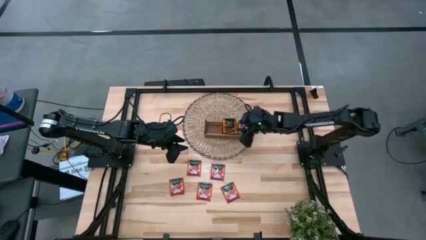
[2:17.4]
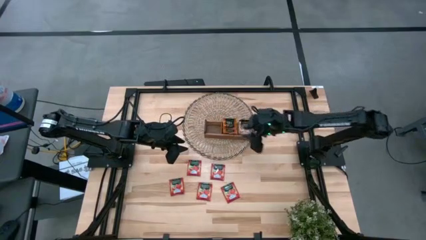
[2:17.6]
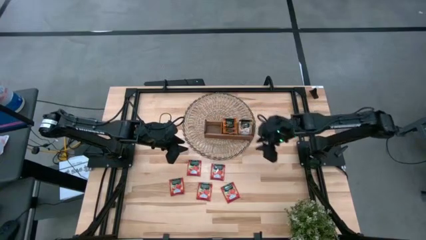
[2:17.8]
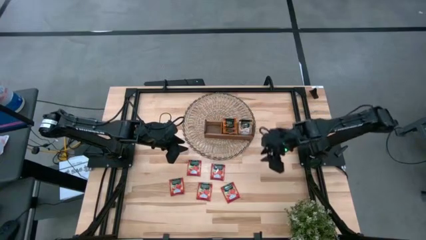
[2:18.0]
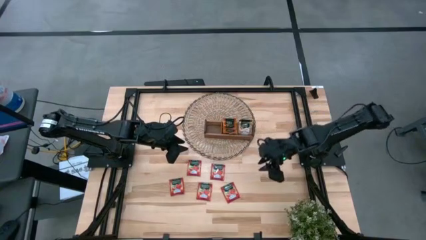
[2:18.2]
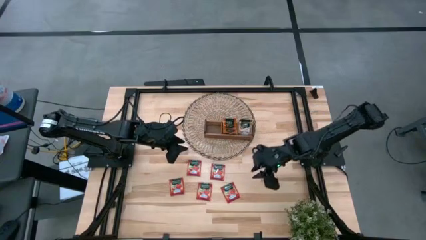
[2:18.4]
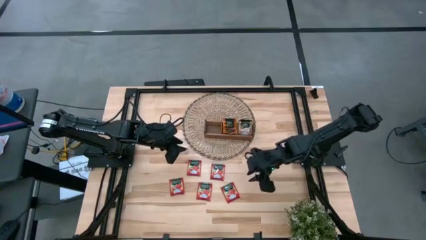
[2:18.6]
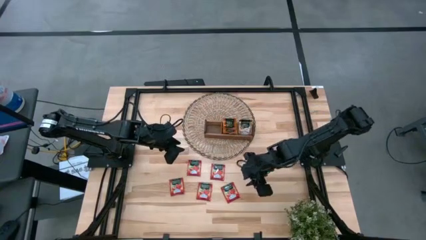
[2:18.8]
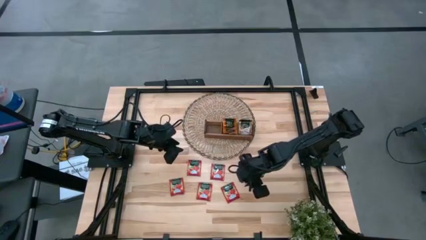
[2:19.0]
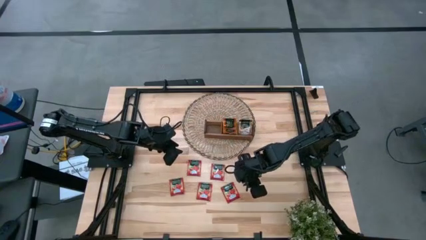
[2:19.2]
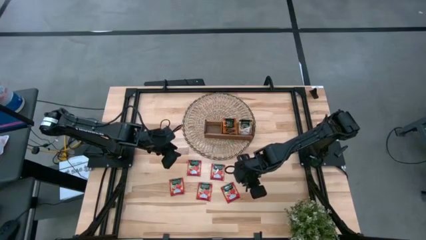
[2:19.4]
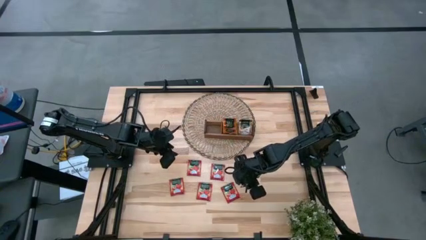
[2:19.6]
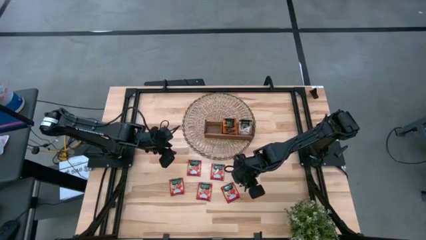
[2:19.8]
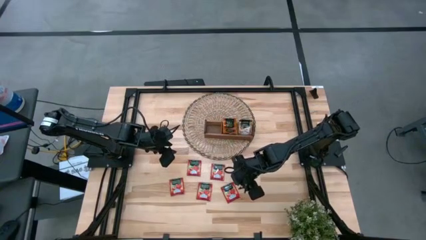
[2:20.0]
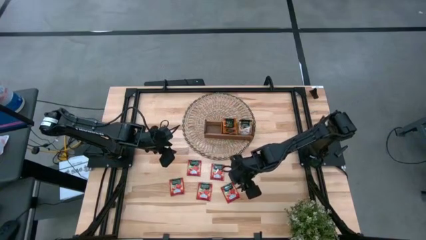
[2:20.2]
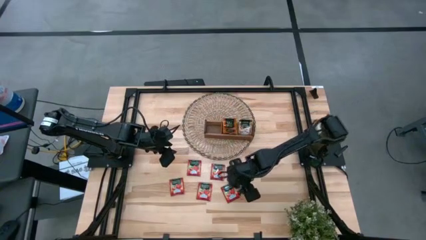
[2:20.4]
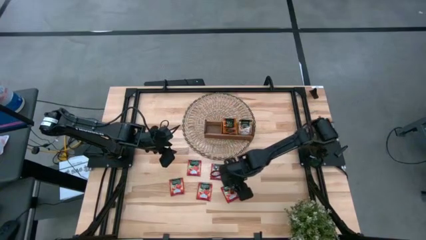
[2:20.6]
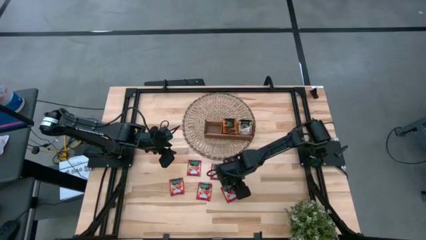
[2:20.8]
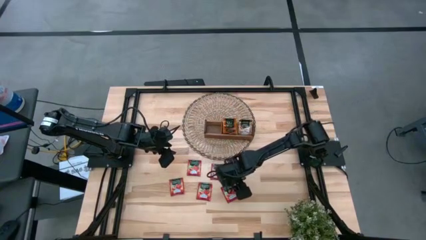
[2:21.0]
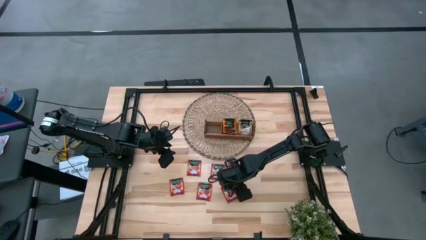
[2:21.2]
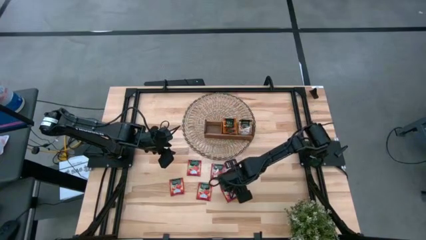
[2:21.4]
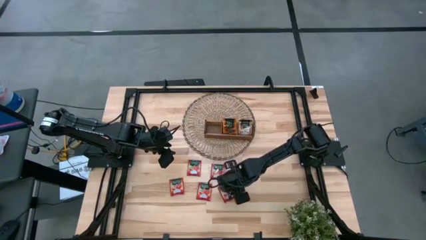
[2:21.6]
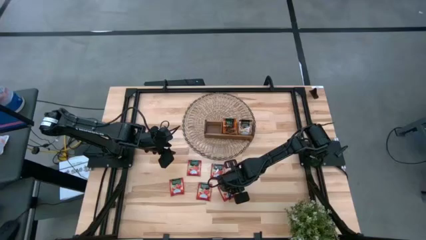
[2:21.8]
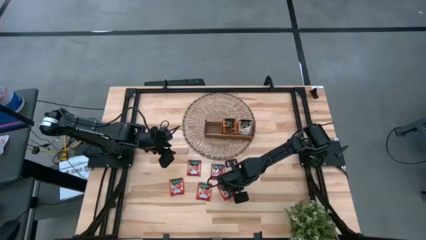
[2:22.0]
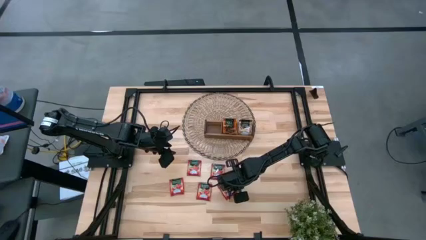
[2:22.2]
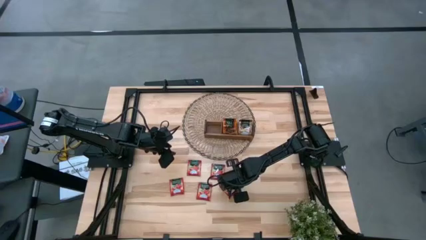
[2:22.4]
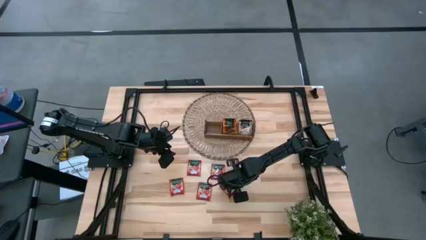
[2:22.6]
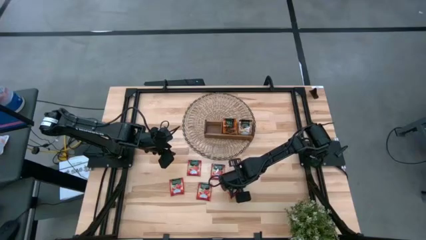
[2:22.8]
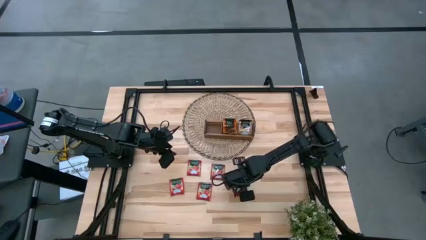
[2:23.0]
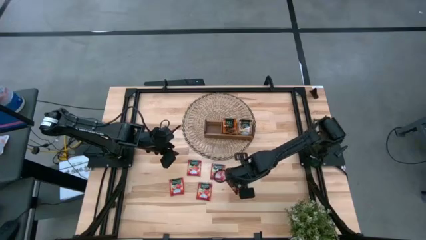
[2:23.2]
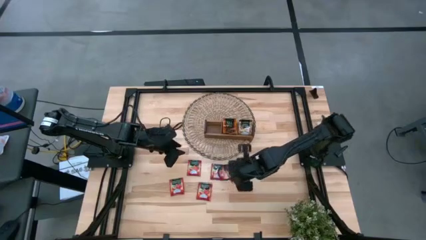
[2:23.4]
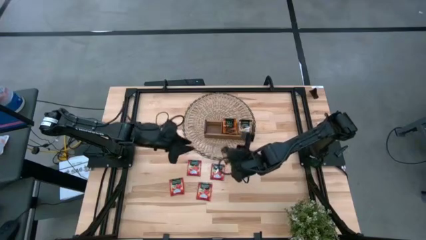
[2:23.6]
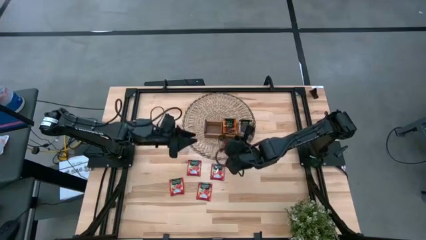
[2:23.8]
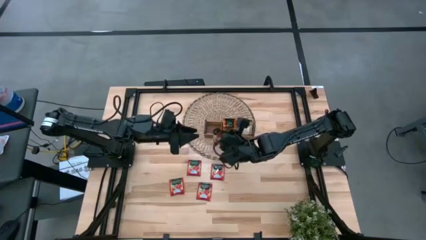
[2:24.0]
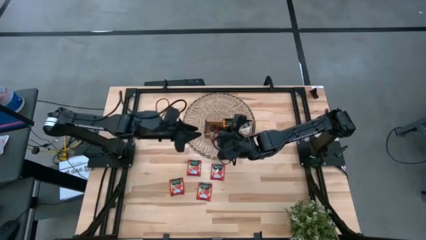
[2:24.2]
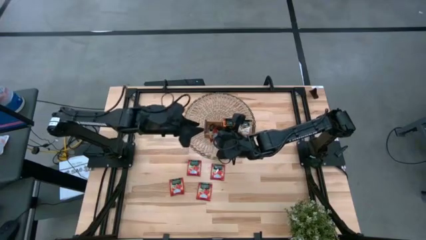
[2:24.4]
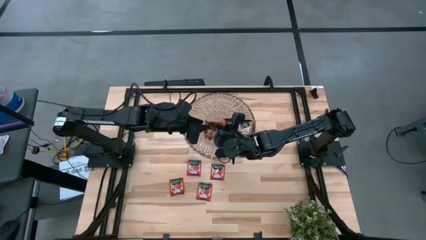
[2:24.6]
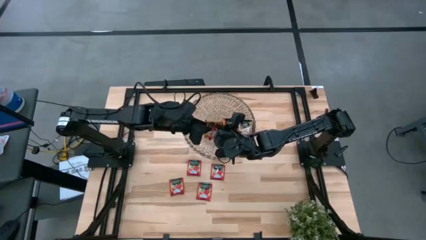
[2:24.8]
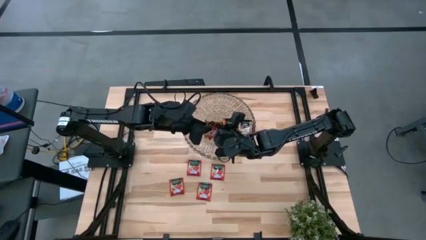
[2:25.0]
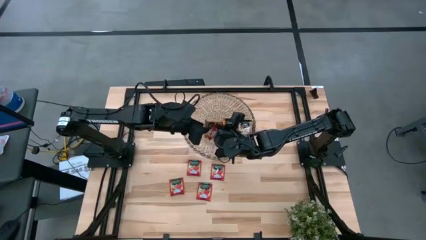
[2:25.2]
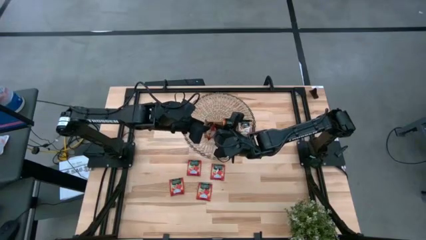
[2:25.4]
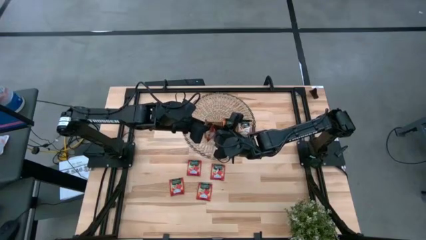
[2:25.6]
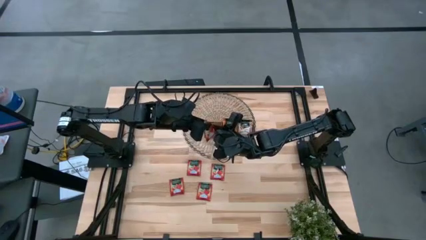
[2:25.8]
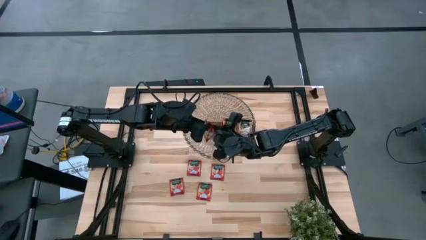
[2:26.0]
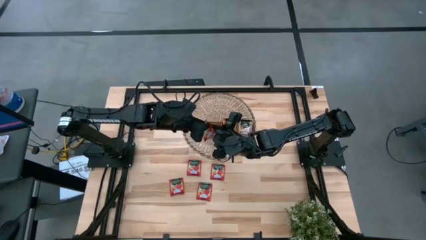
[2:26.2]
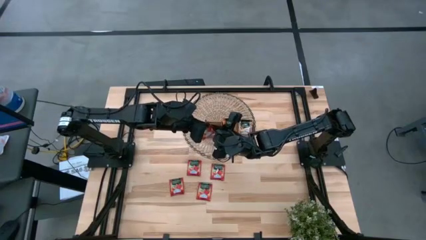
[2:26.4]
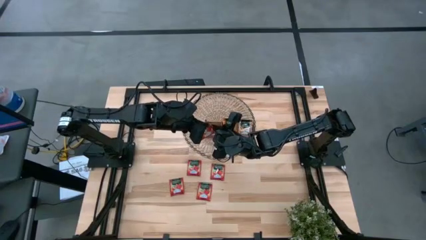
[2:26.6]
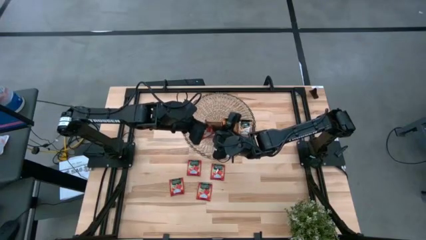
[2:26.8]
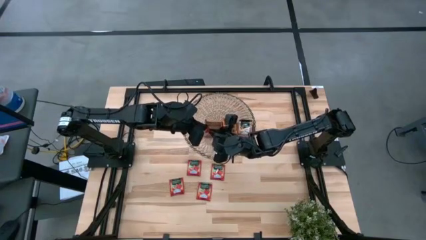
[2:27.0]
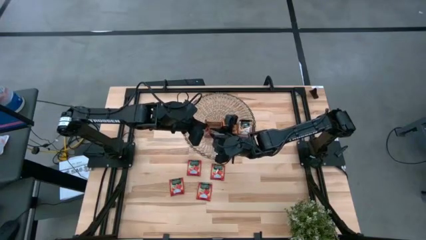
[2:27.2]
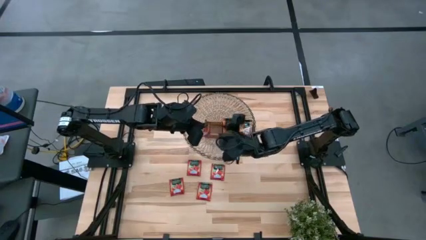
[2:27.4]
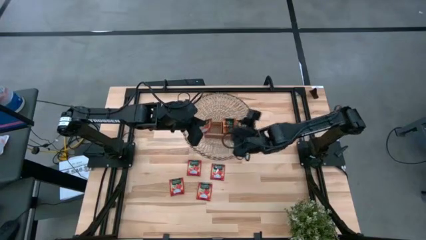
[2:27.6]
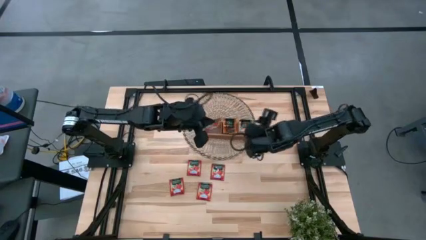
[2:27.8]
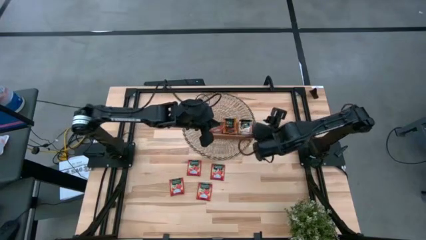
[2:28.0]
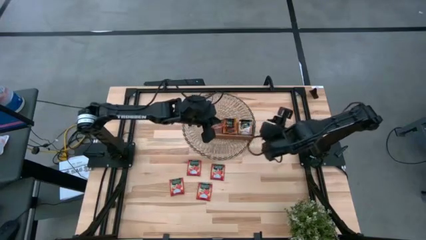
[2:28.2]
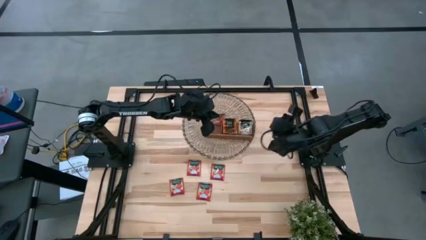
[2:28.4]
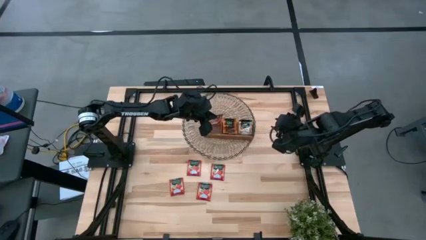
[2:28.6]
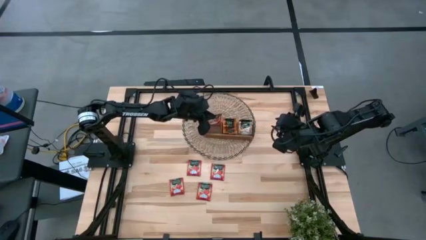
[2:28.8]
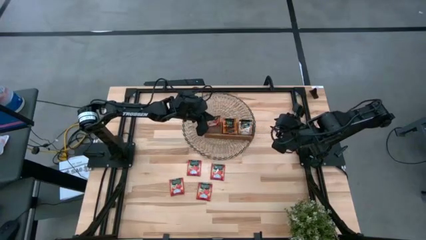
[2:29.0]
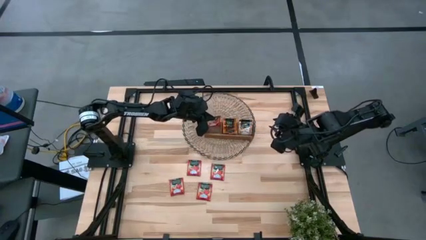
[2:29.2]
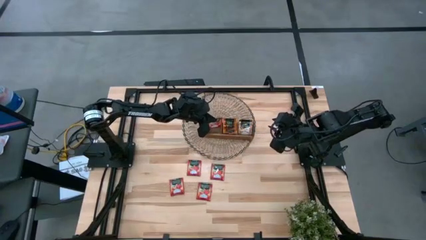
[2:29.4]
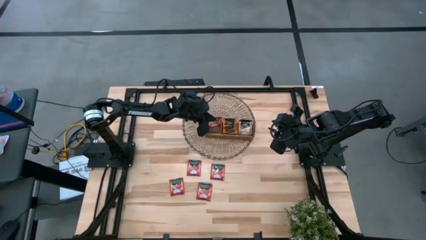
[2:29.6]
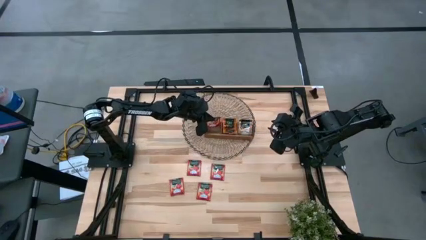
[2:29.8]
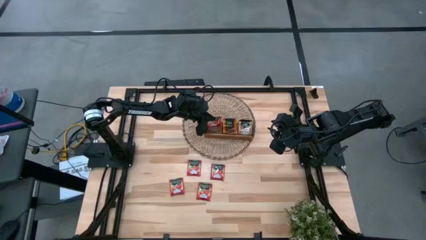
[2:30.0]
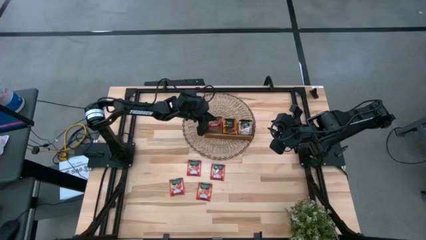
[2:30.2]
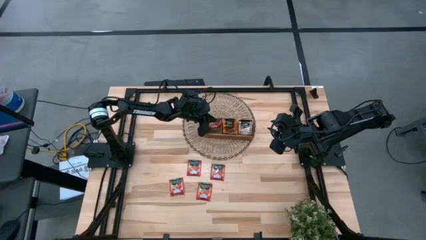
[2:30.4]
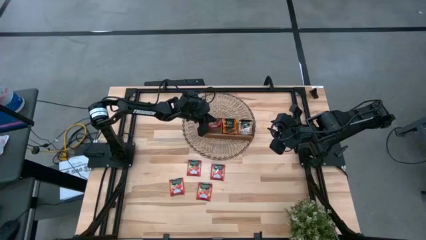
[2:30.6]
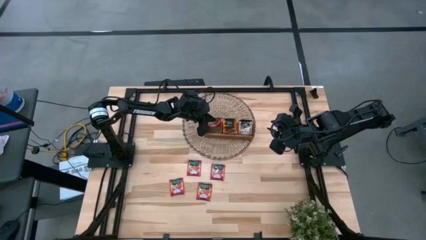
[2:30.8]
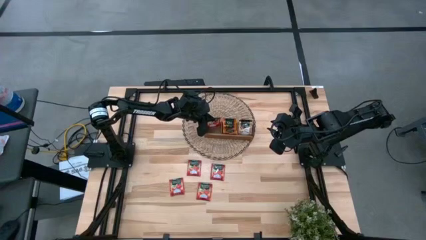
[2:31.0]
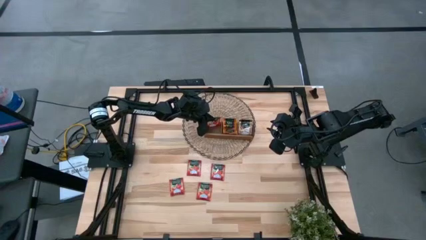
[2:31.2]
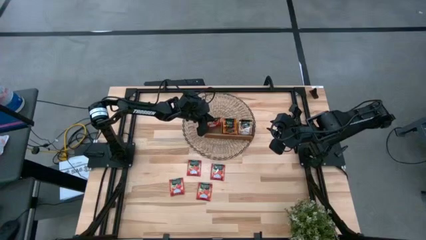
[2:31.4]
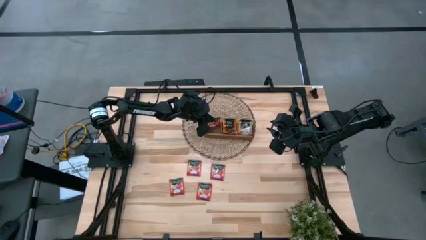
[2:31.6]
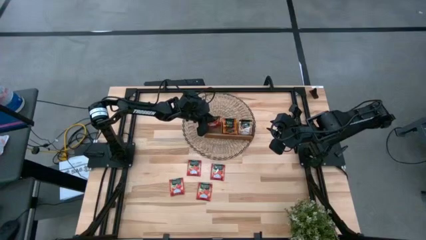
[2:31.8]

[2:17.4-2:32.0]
Task: Pick & Place Tea
Put the red tea bag into the left slot of the wooden organizer

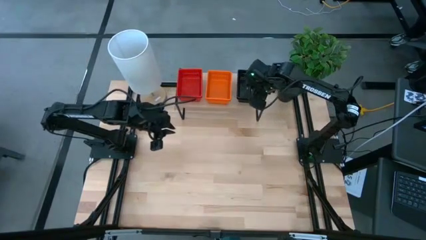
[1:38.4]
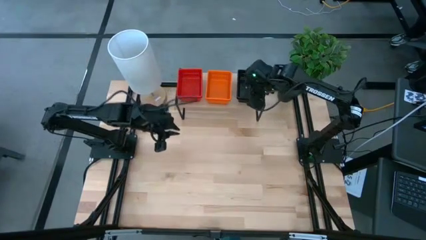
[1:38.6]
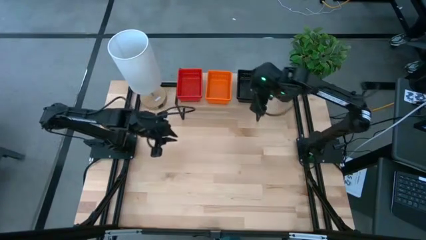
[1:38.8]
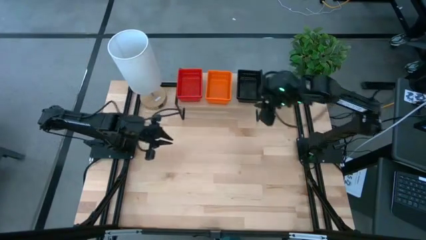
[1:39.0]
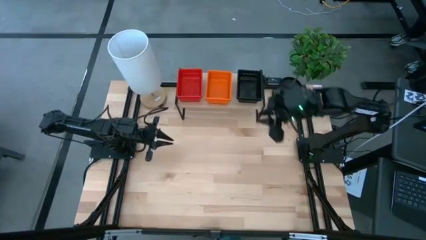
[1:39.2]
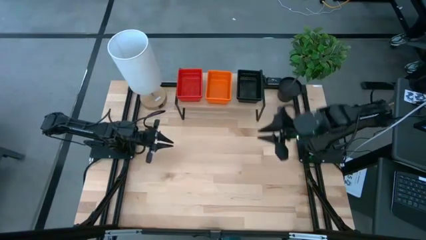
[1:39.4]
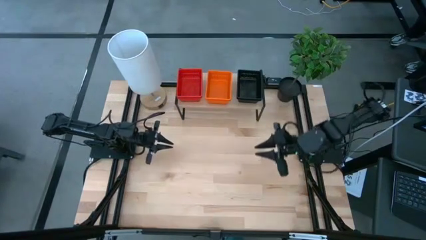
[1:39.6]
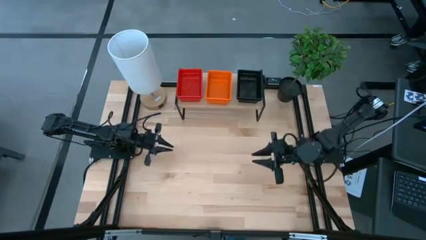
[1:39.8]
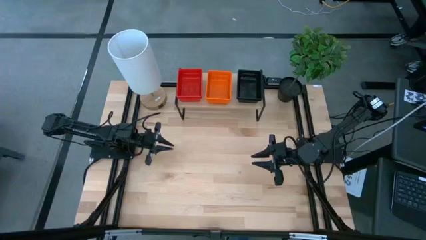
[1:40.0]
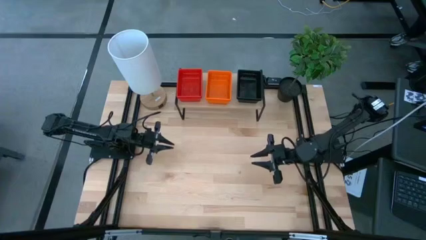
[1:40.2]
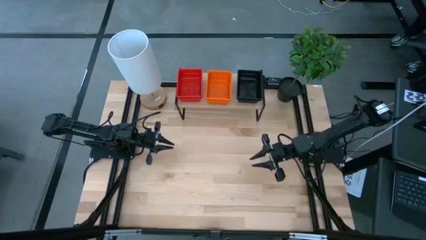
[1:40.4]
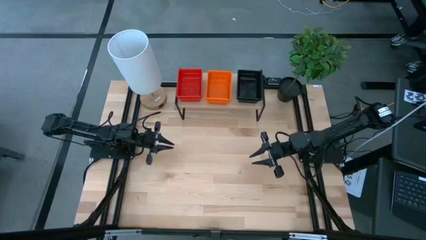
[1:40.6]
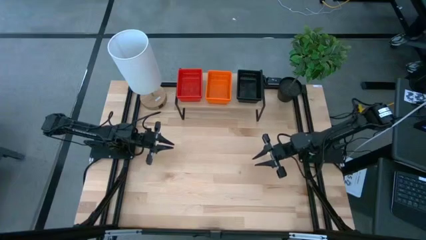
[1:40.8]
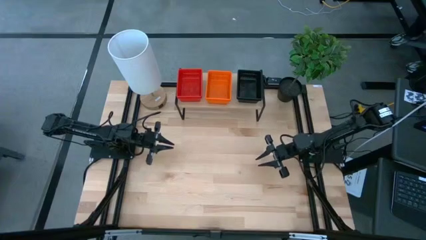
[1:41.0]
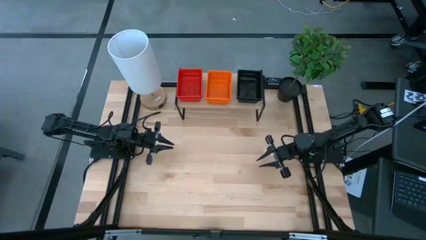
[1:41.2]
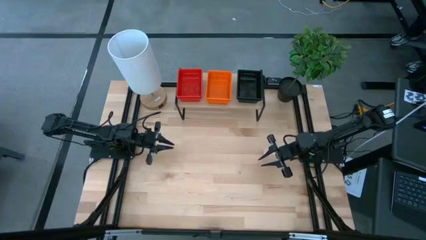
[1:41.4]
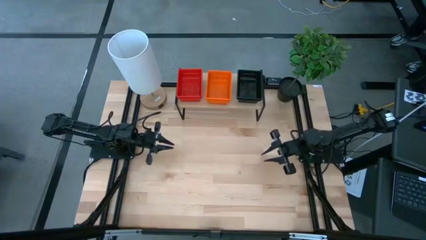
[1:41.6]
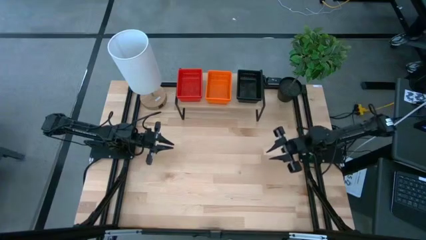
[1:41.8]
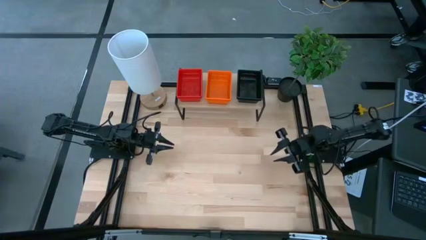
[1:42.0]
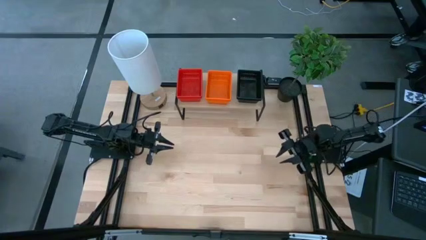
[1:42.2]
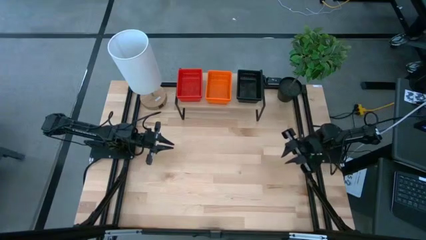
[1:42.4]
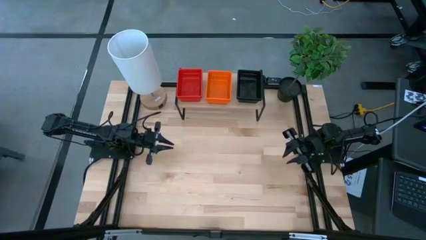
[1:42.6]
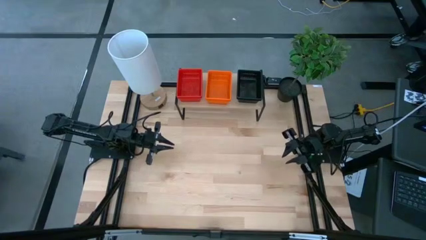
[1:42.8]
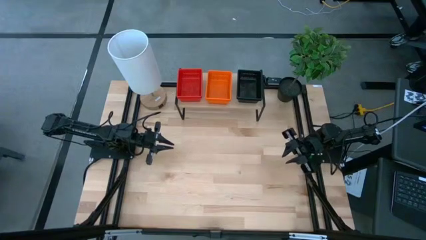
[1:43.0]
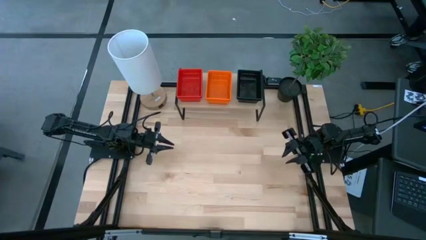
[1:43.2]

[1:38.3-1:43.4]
Task: Stack baskets on shelf by color
Return to Home Position
